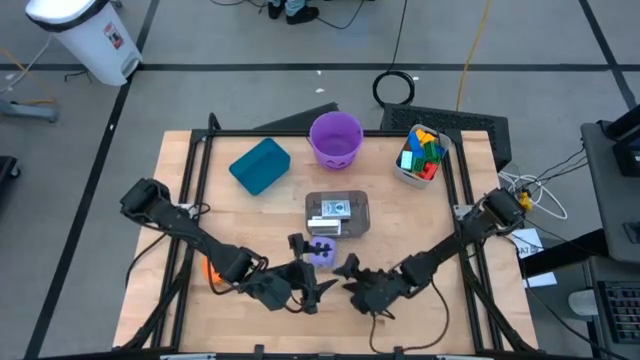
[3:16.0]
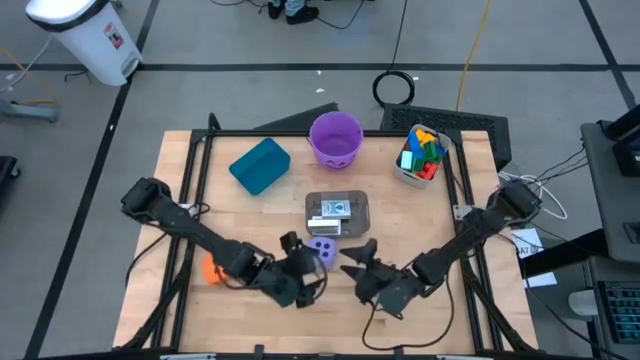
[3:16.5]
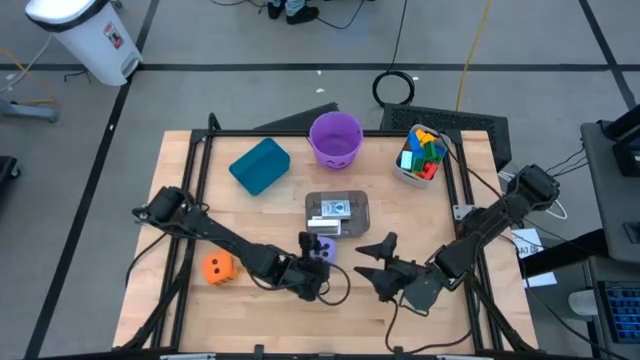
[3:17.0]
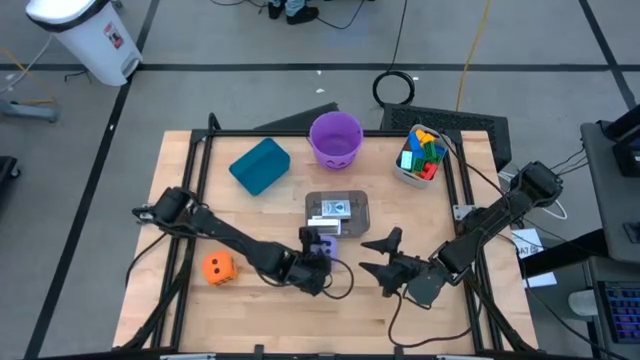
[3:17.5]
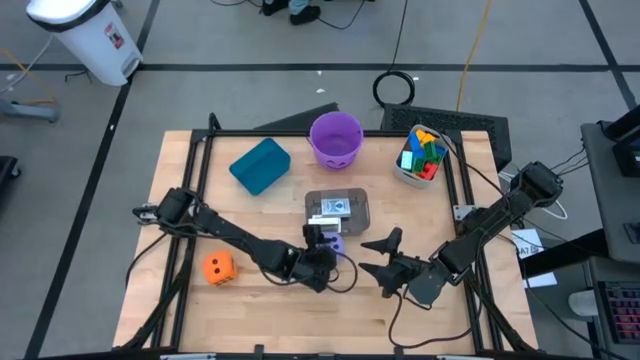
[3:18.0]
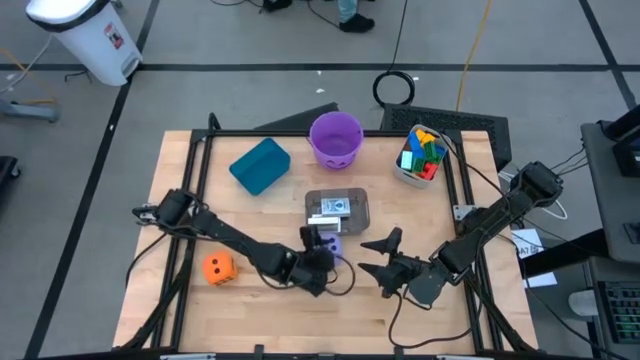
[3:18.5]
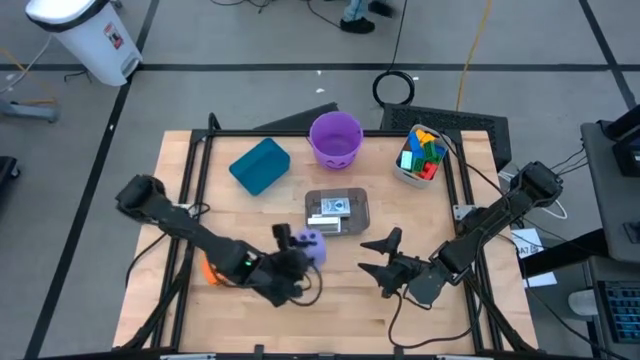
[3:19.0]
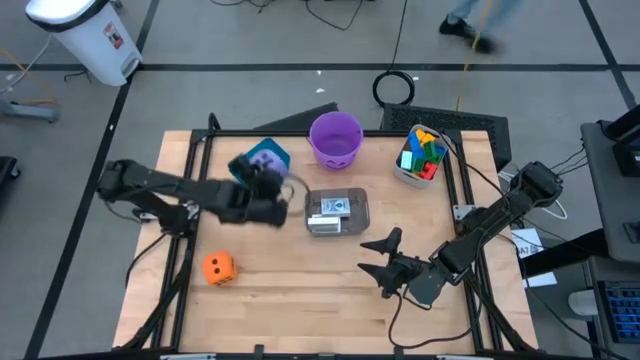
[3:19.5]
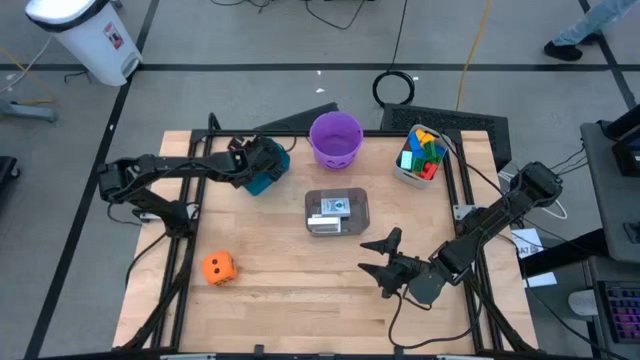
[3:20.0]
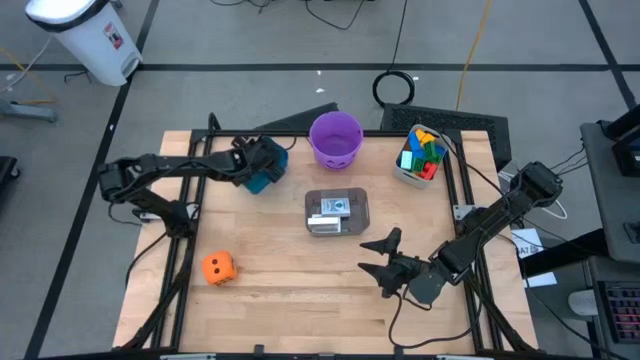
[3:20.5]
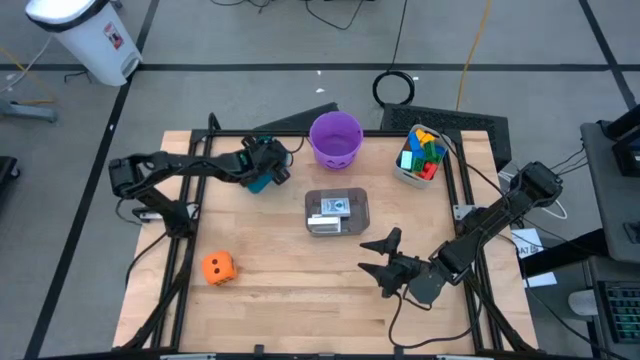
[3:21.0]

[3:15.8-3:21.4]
Task: Pick & Place Toys
Put the purple die into the blue bin

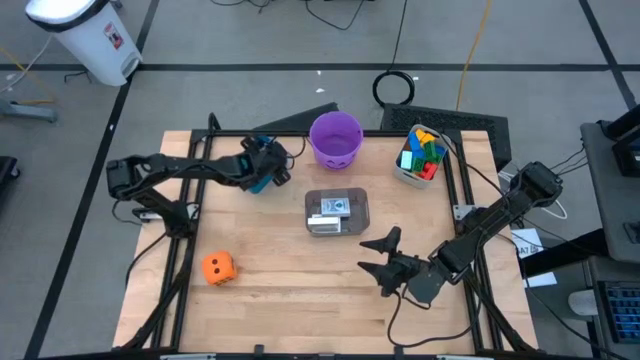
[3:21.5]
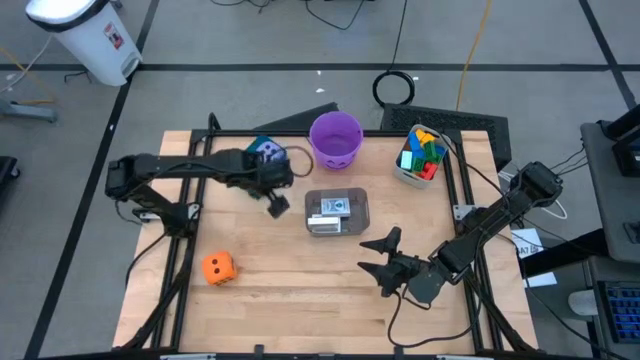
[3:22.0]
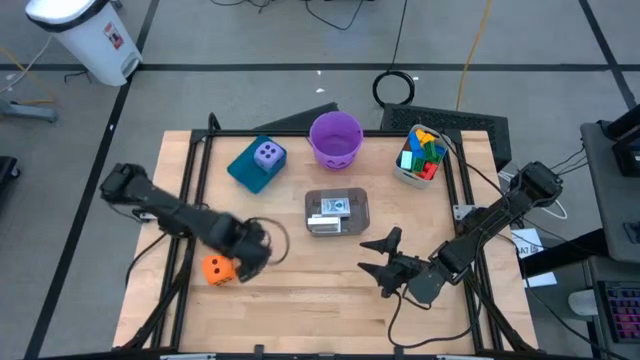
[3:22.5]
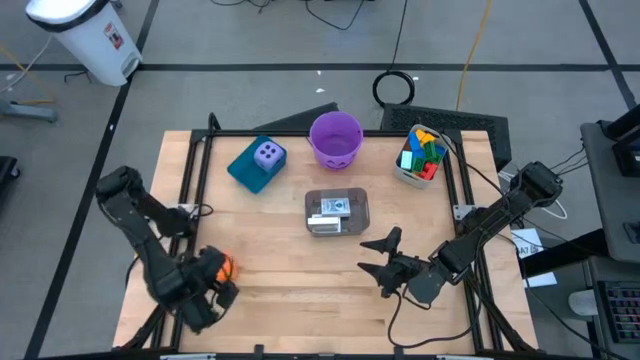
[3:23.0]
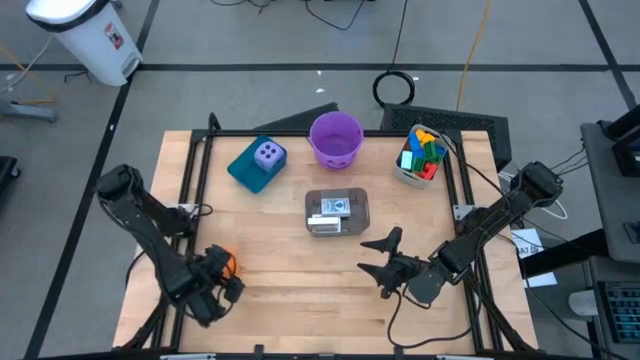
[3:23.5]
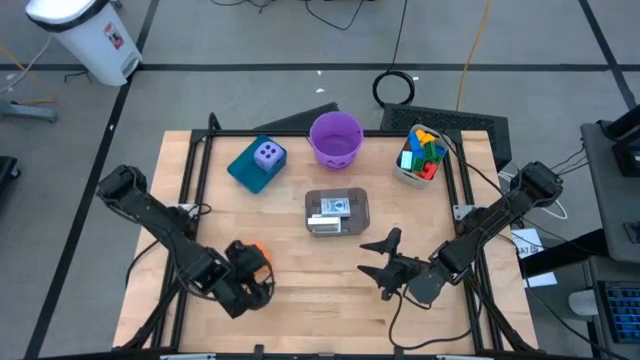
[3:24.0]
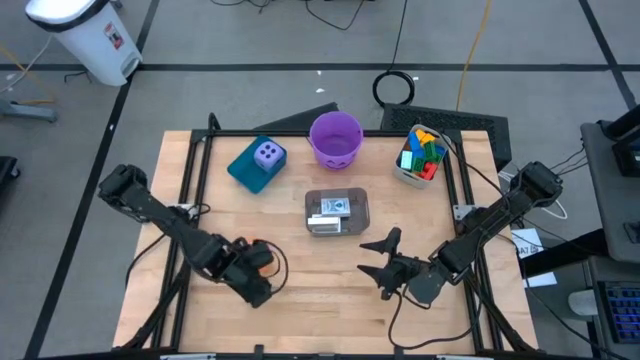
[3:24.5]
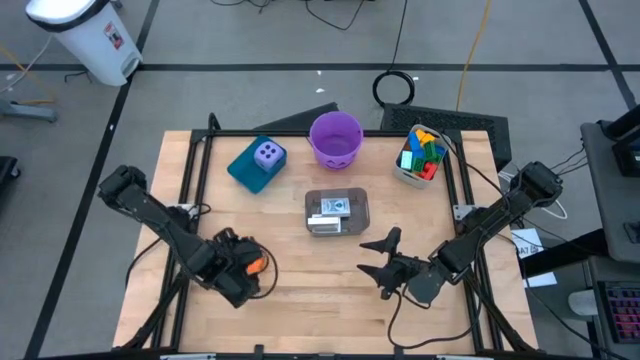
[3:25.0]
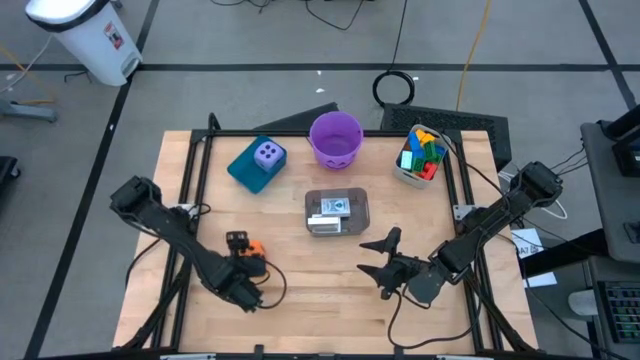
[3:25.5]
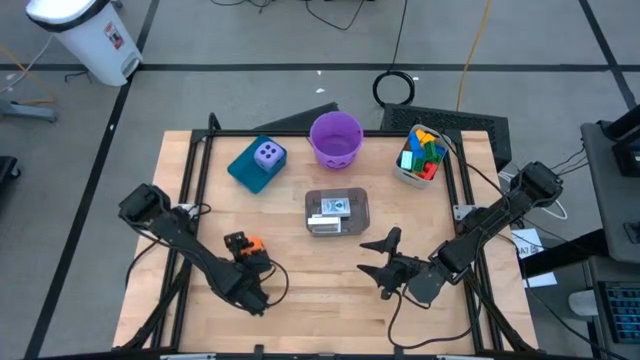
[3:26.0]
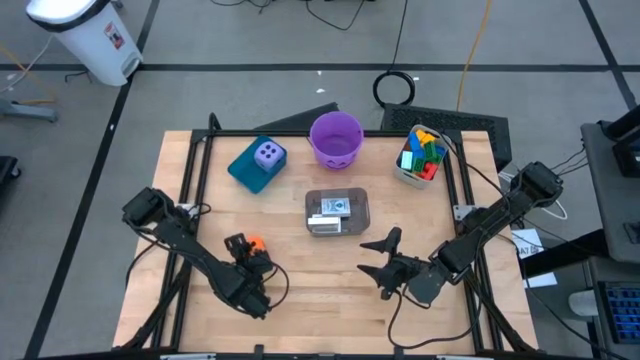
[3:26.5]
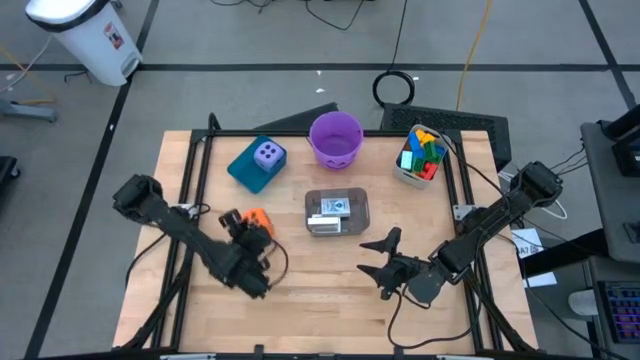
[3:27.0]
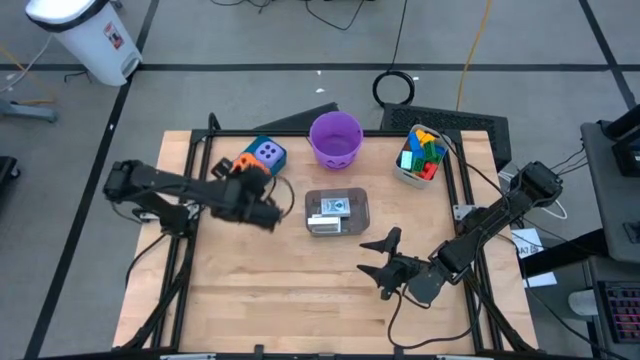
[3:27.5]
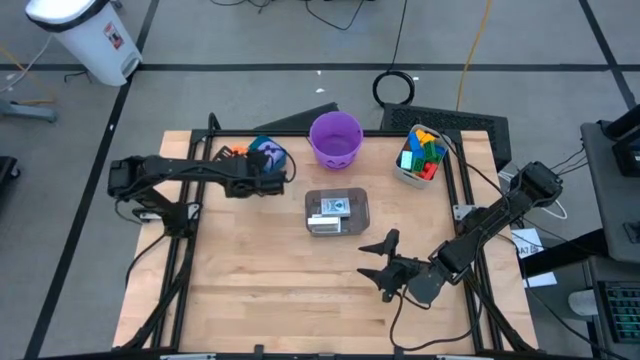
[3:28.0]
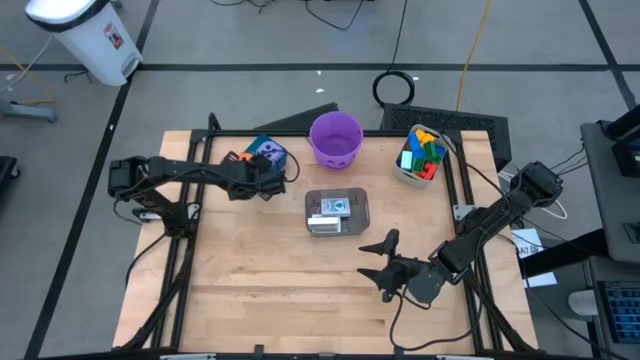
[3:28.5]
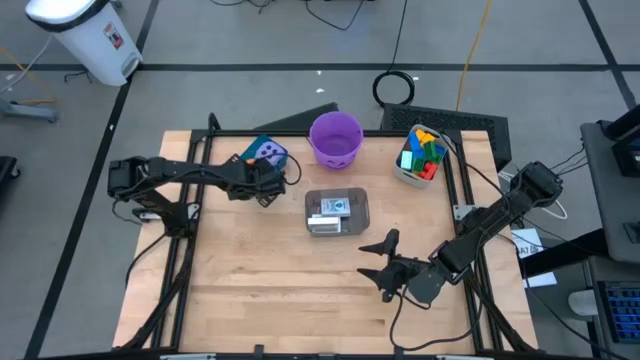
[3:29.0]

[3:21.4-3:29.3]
Put the orange dice into the blue bin

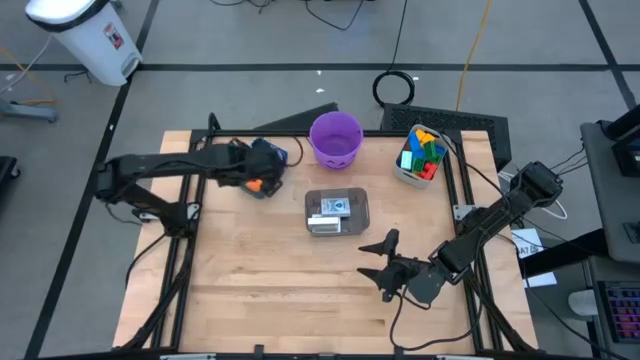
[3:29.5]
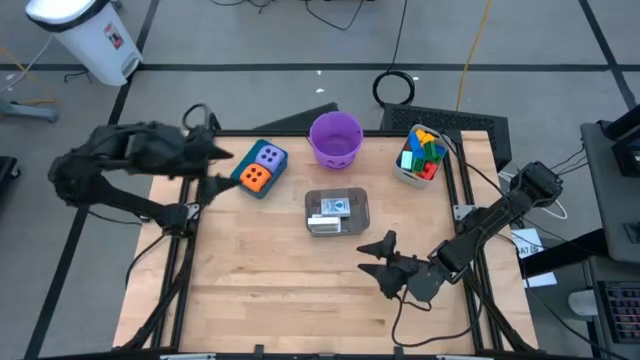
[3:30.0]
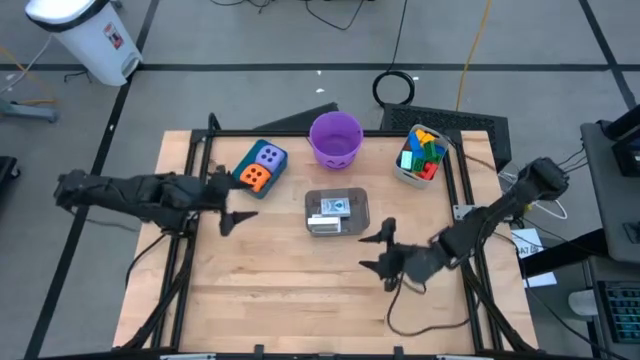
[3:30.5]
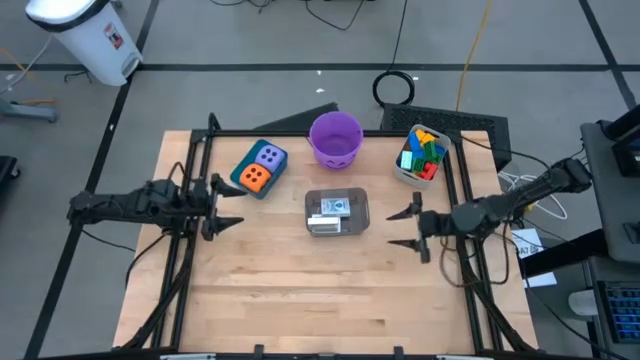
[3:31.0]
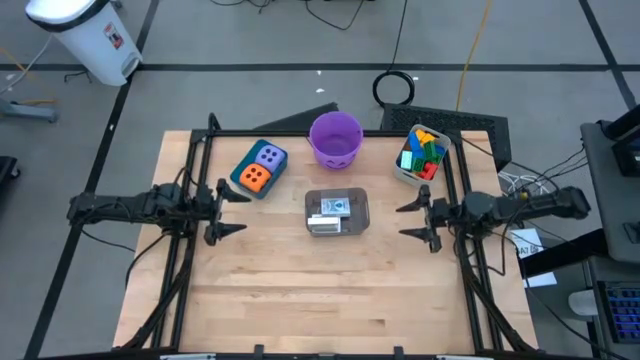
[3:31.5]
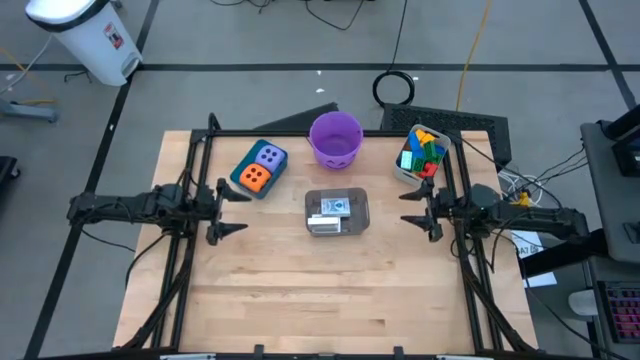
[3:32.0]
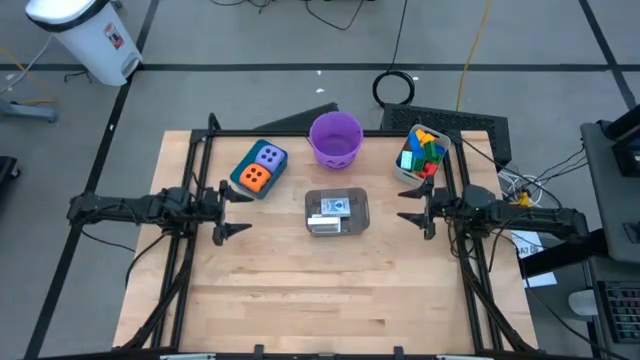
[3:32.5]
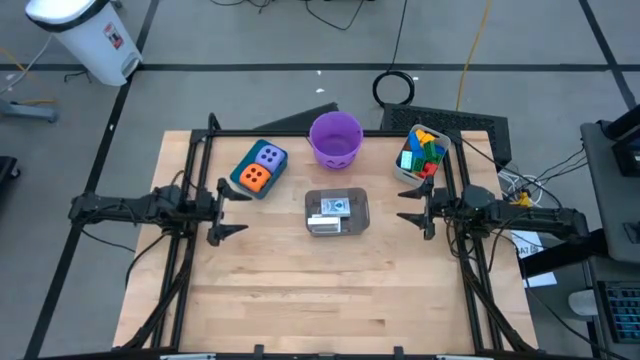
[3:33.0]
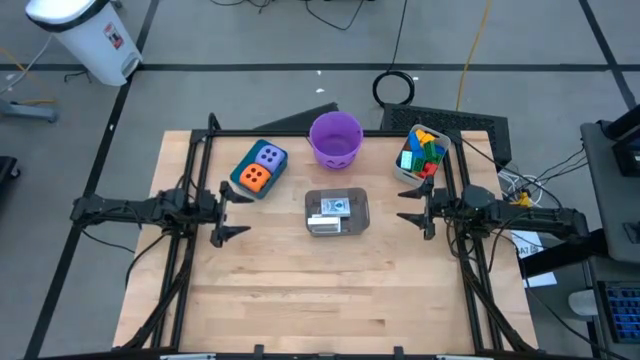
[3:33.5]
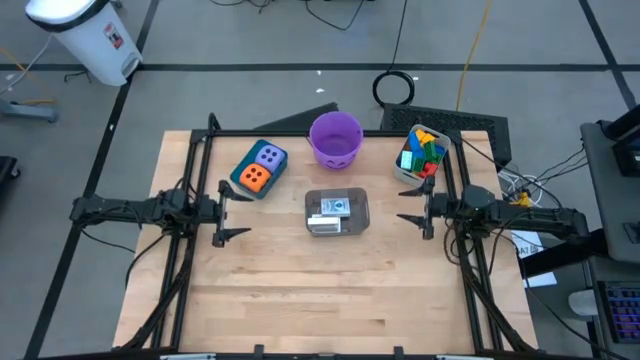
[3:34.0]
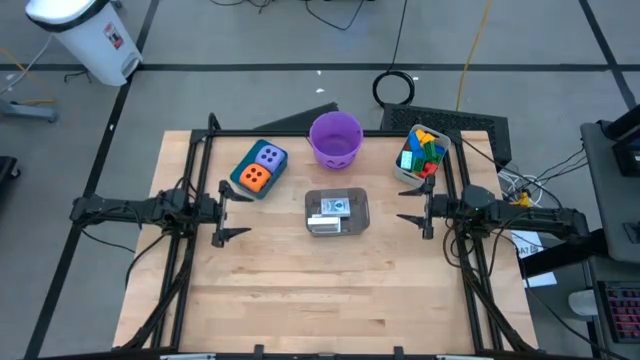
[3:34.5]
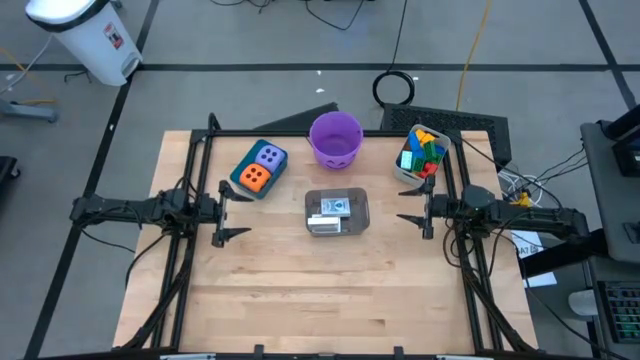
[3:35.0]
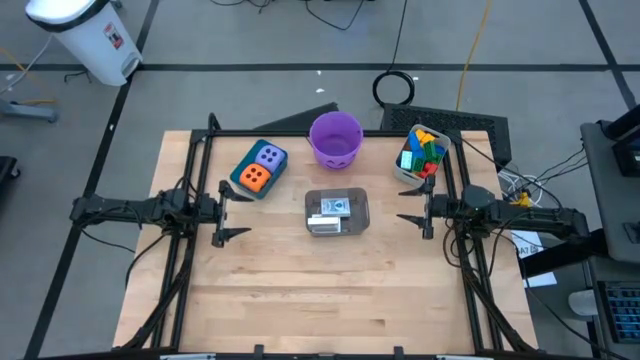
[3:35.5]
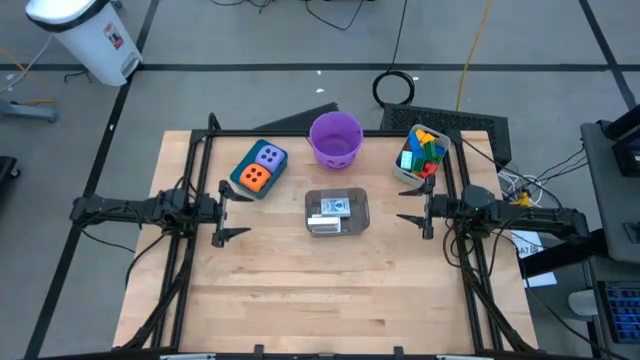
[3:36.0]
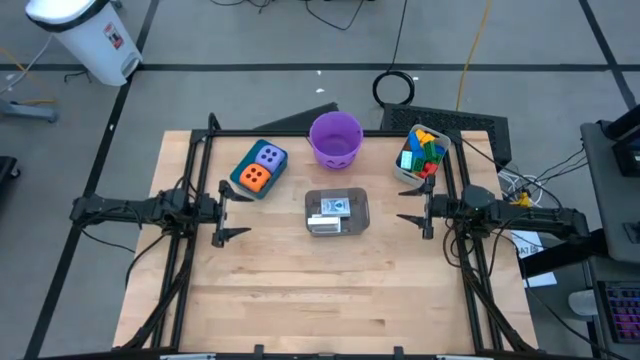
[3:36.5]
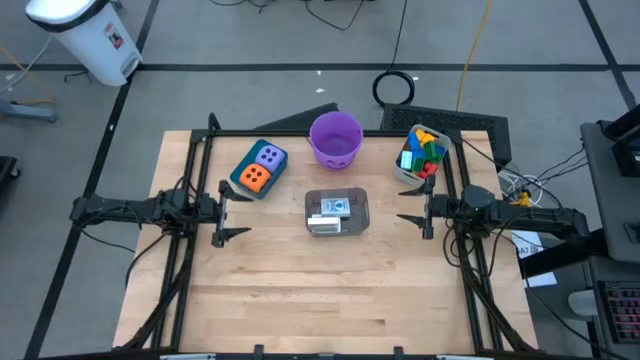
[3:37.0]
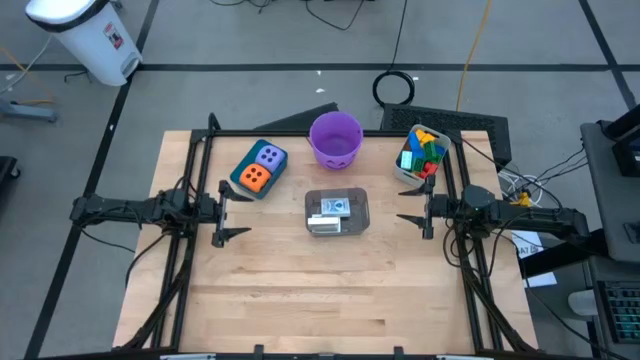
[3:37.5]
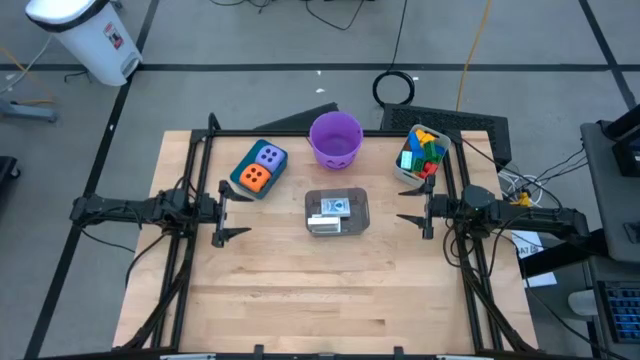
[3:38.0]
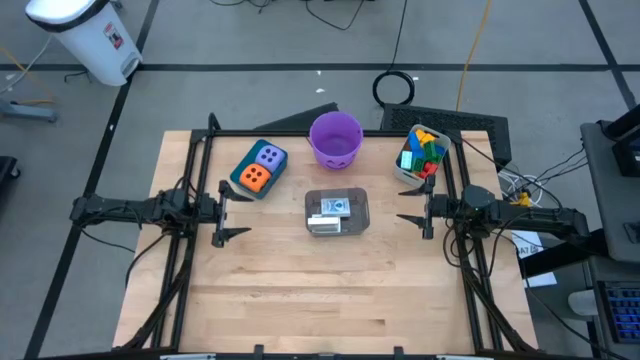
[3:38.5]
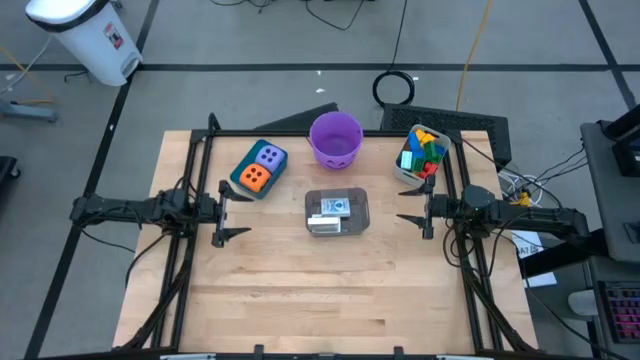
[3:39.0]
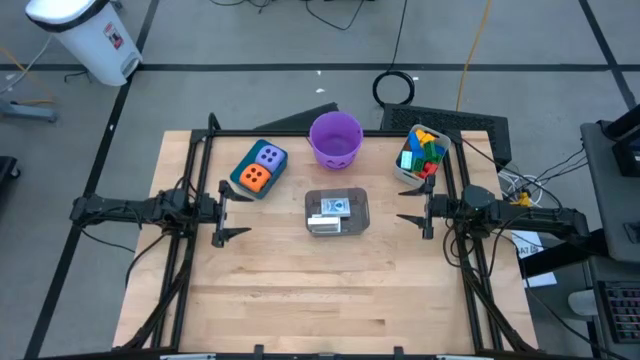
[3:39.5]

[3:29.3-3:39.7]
Return to Home Position
